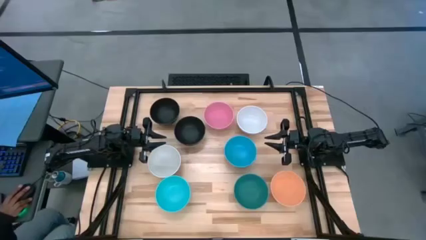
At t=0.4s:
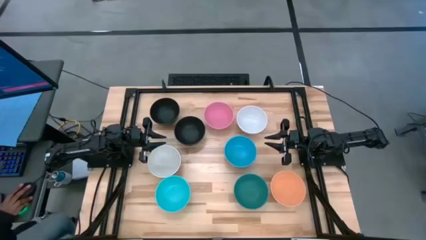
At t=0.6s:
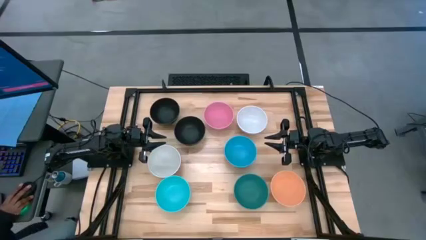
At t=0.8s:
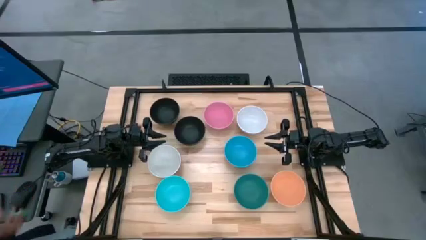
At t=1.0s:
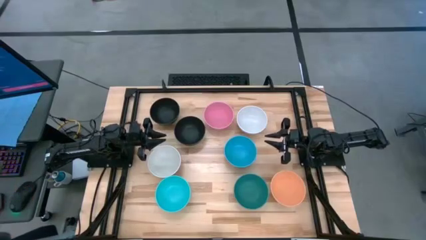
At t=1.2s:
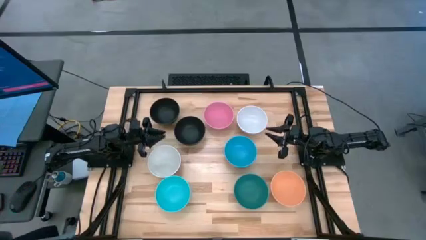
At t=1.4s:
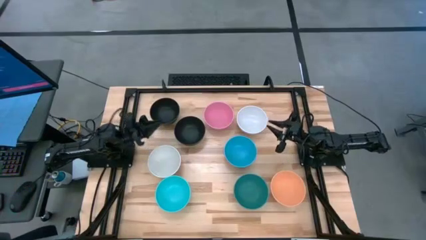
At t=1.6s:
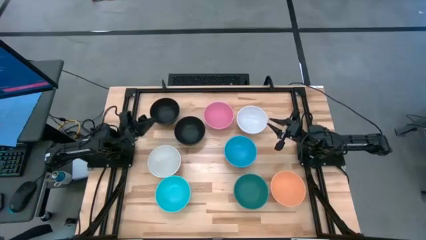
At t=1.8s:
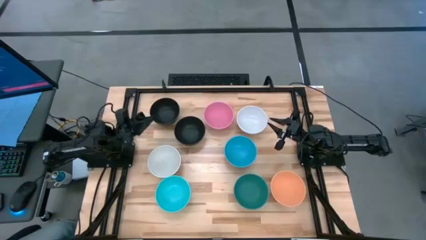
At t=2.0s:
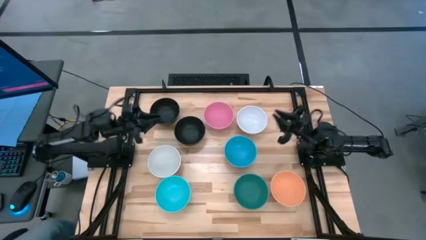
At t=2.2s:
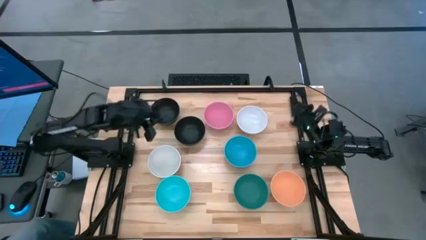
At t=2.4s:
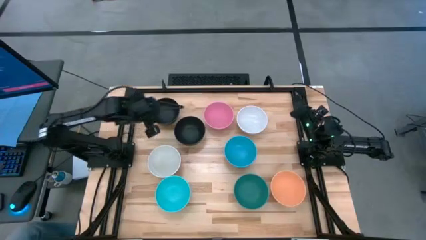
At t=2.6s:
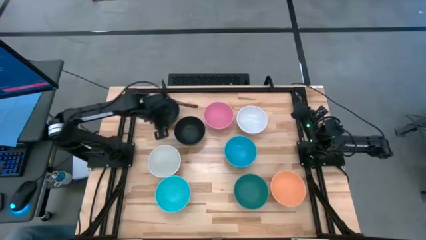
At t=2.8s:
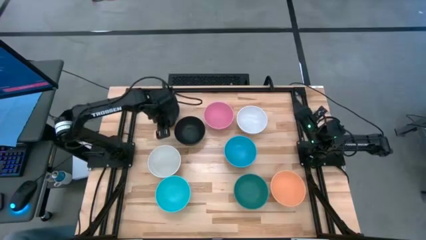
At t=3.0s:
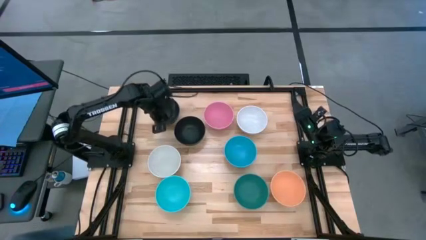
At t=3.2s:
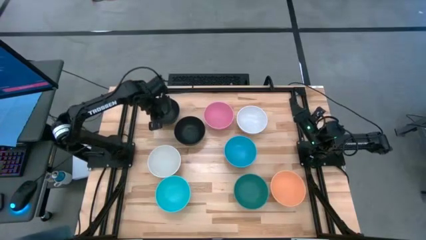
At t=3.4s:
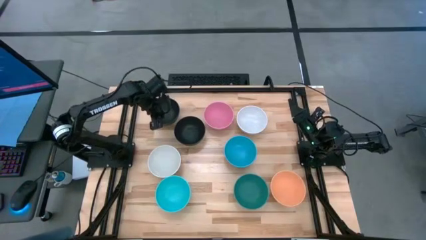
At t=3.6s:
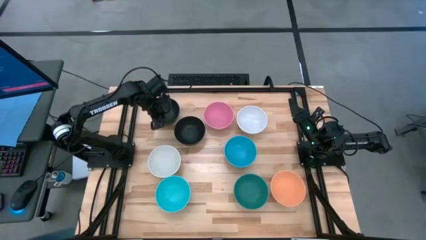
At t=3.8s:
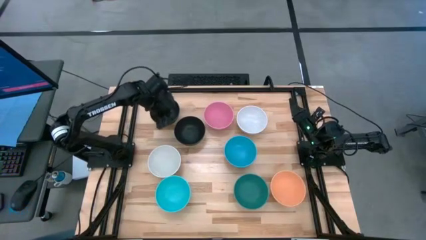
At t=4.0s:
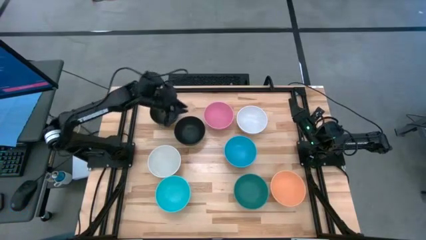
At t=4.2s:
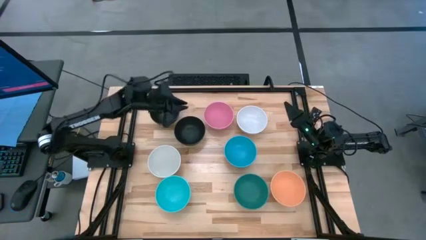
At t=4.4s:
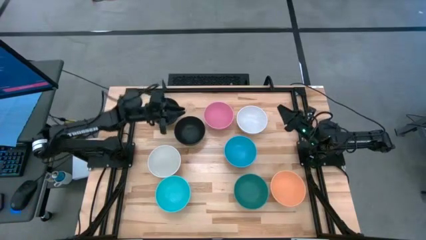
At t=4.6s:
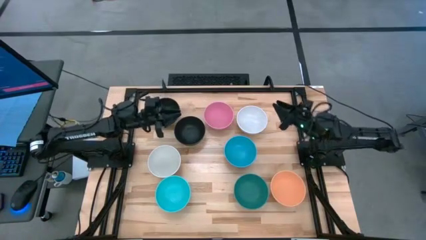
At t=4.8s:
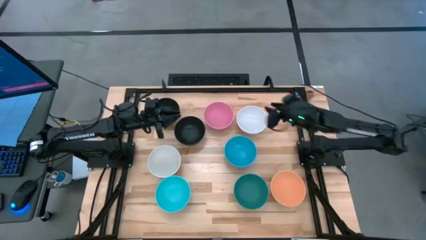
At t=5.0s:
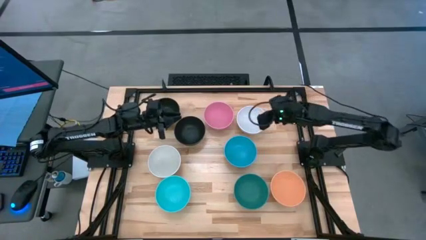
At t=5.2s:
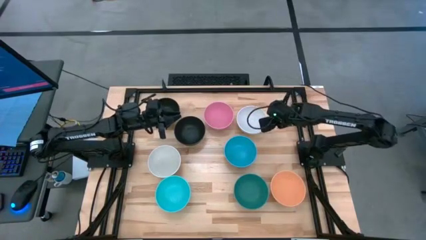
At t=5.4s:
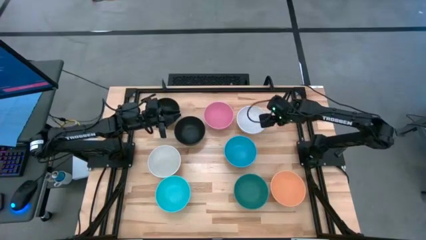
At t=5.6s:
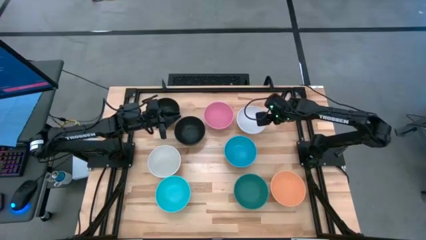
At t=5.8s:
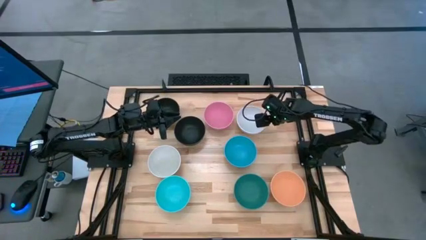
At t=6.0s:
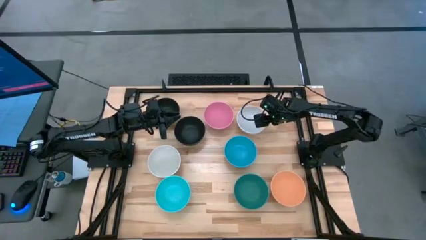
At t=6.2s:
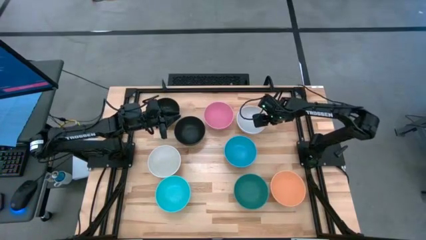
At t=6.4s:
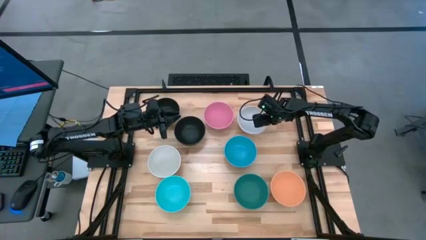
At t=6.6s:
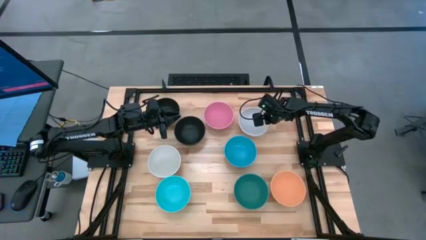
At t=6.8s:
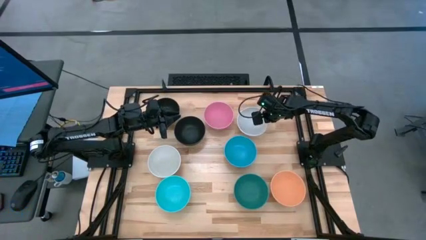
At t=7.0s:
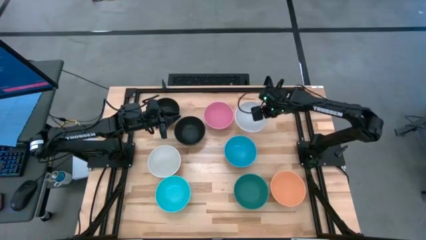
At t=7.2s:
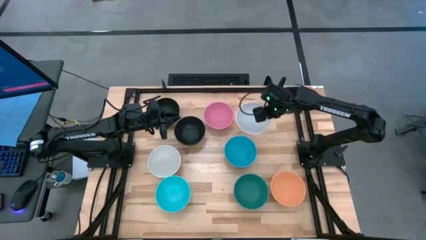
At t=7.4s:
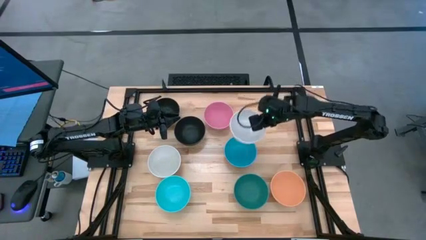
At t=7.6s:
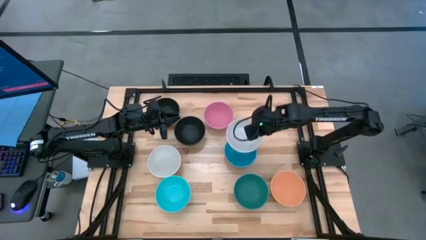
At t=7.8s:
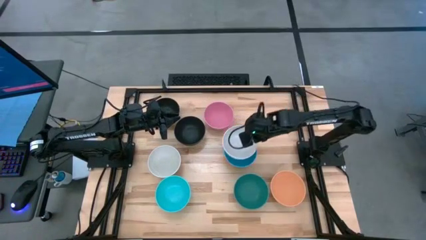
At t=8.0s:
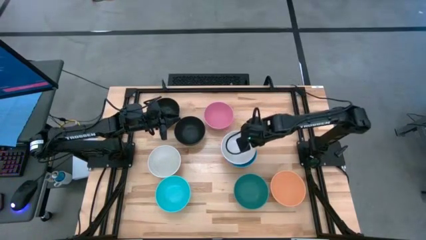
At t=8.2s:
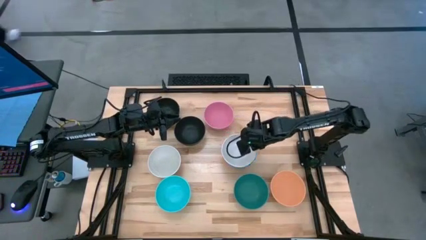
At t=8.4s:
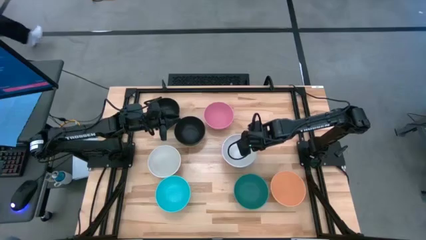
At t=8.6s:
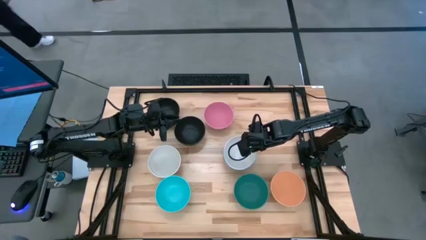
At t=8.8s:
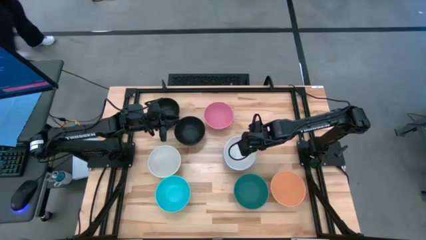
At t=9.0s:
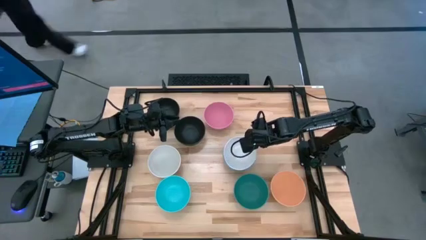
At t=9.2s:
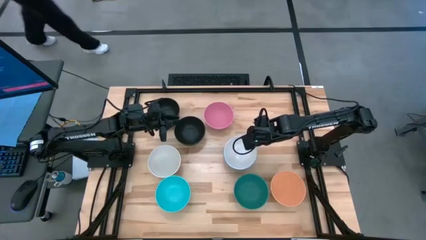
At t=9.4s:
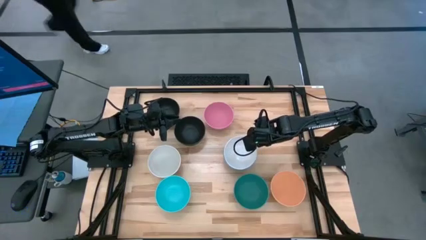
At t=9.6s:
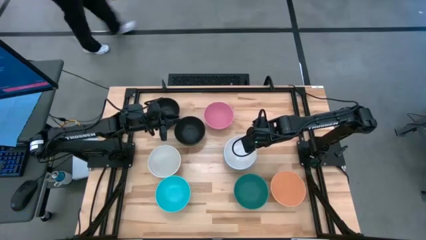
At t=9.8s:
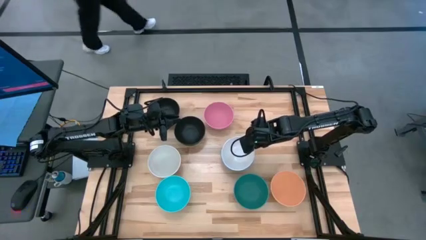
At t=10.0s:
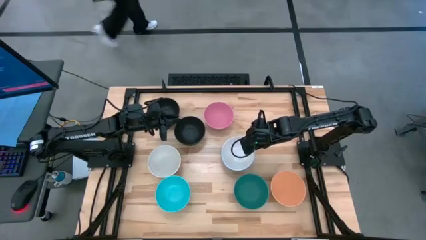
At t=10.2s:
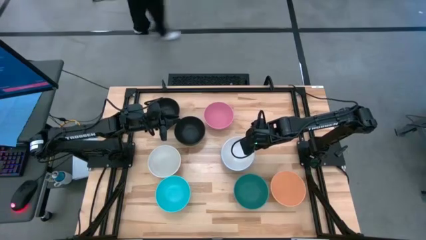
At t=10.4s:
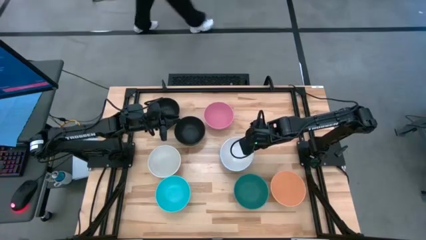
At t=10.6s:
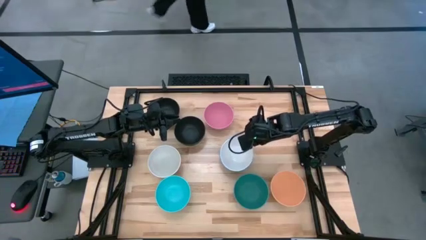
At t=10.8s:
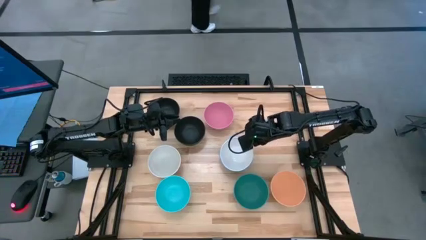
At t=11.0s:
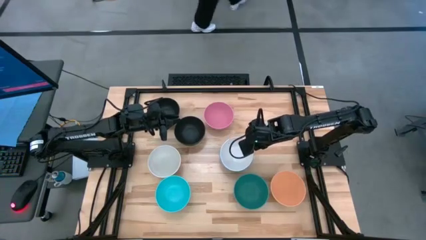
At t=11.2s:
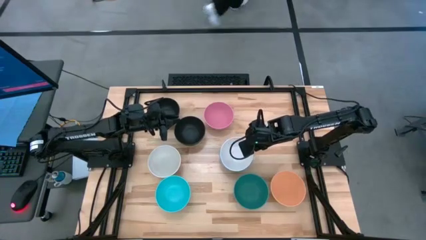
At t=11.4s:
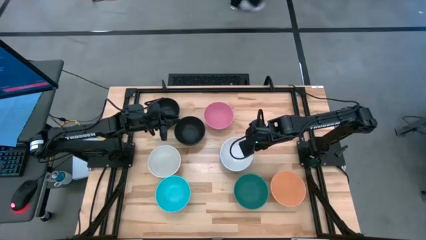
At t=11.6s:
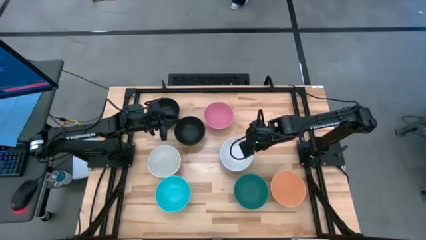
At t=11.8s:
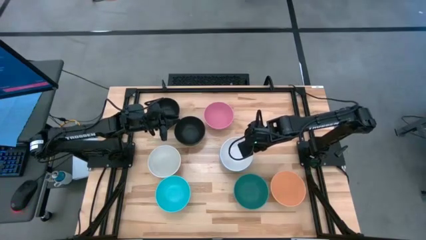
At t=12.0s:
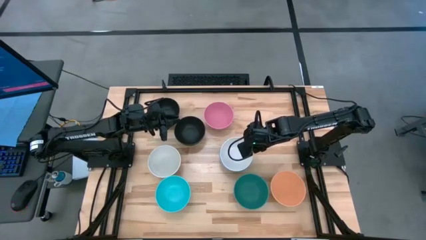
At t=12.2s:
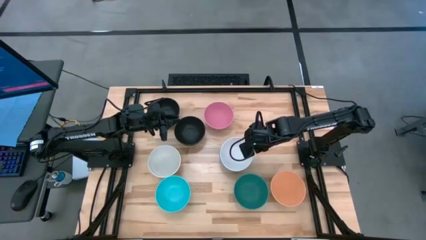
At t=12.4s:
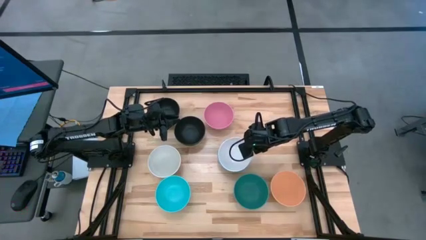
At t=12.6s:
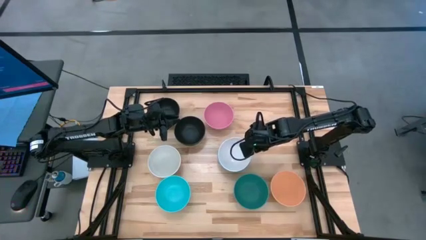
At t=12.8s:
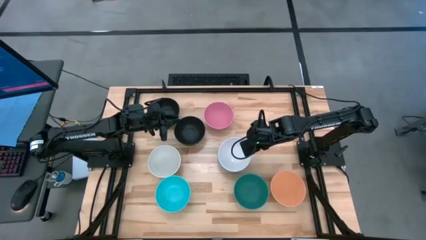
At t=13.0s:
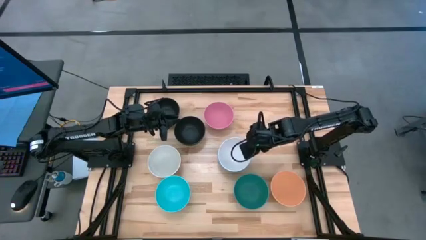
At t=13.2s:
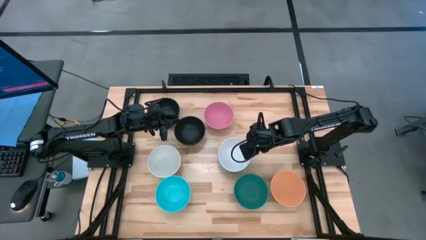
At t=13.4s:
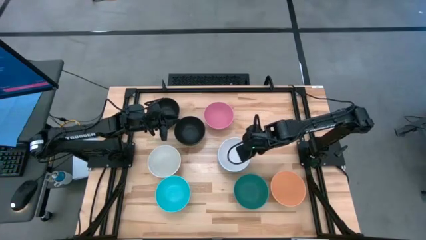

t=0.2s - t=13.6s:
Task: Nest bowls inside each other
Stack the right white bowl on top of the right blue bowl

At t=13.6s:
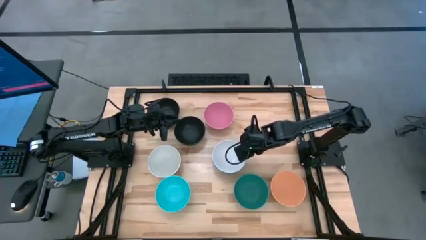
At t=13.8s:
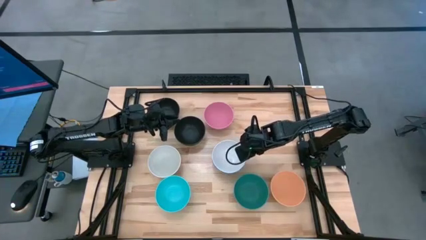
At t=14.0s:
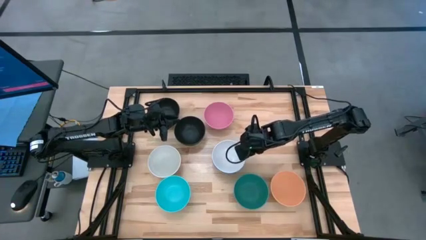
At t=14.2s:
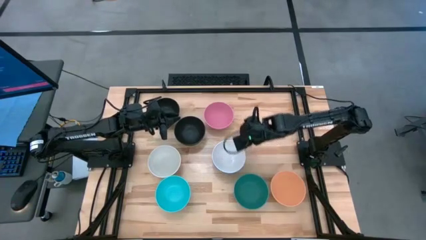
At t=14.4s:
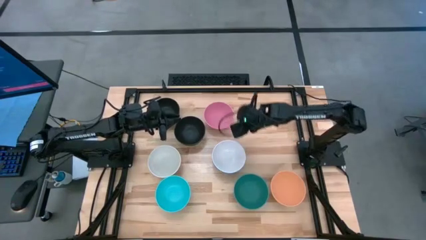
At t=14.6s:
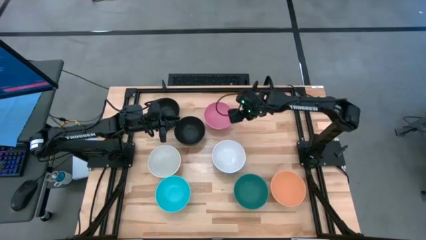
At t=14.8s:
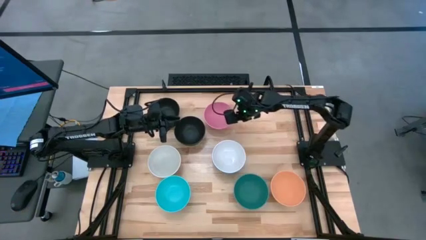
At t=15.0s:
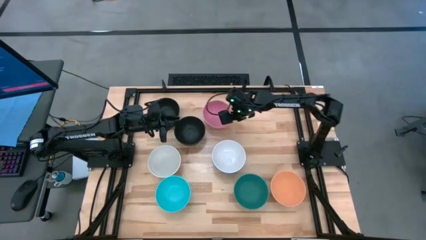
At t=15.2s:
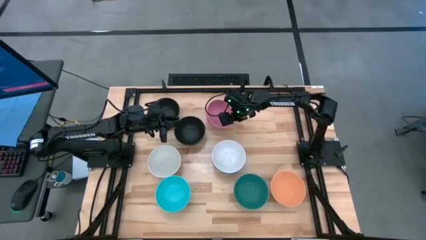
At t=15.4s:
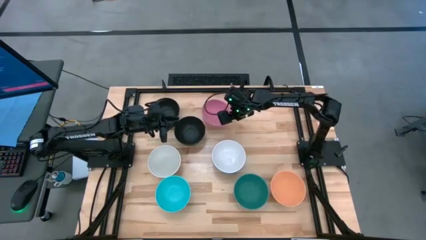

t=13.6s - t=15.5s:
Stack the pink bowl on top of the white bowl

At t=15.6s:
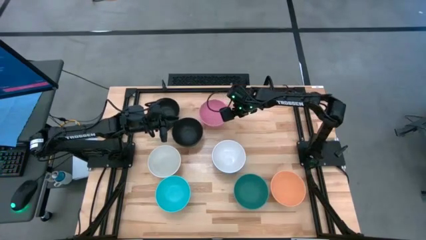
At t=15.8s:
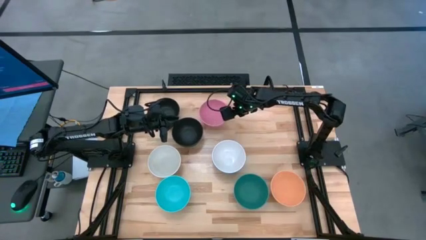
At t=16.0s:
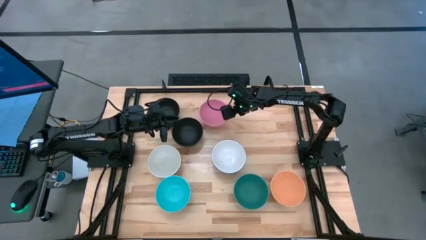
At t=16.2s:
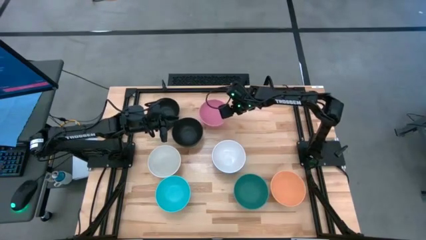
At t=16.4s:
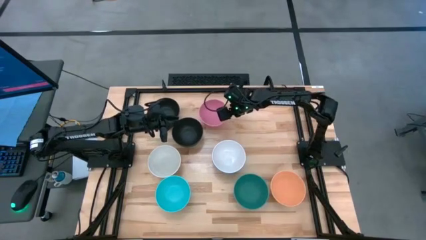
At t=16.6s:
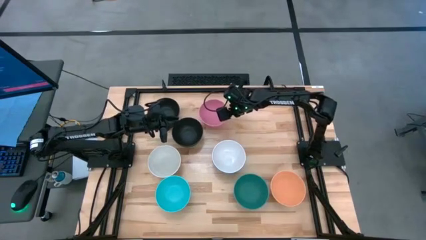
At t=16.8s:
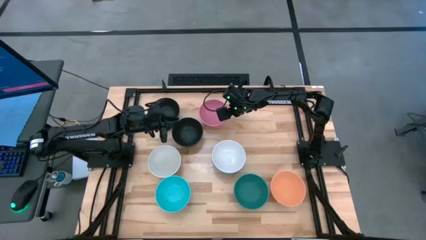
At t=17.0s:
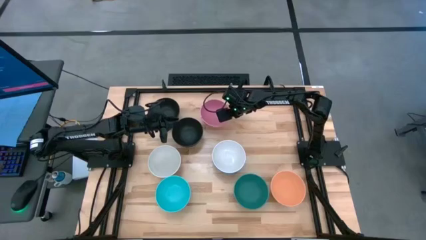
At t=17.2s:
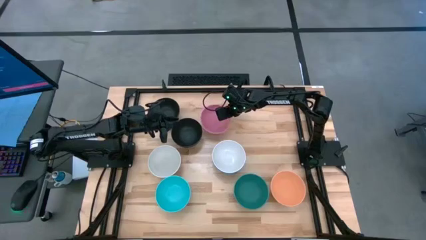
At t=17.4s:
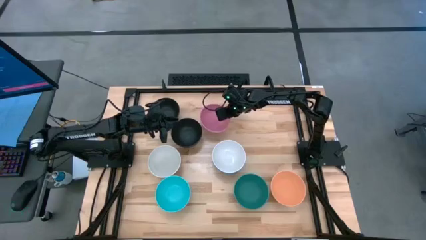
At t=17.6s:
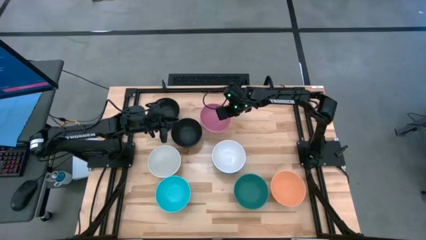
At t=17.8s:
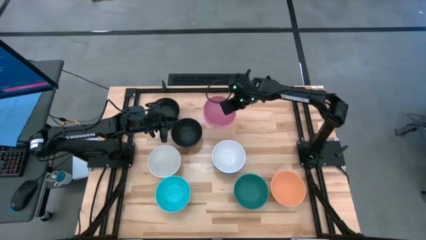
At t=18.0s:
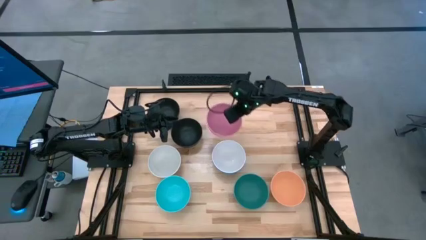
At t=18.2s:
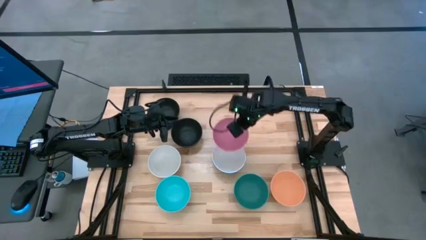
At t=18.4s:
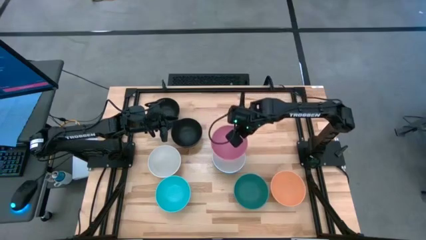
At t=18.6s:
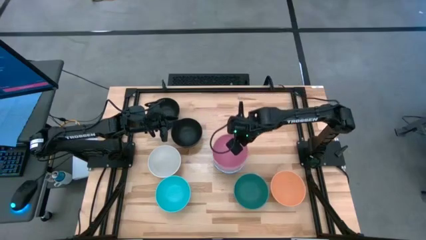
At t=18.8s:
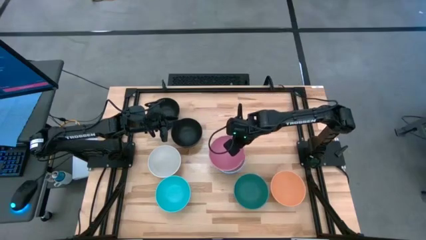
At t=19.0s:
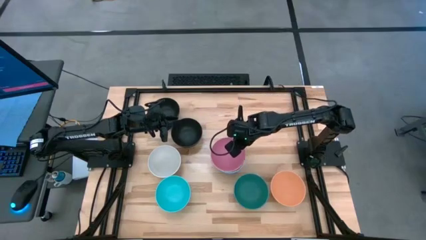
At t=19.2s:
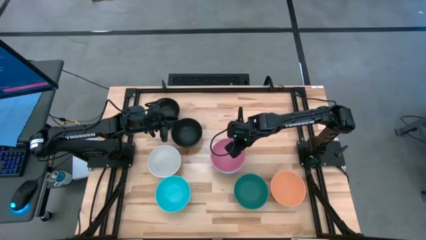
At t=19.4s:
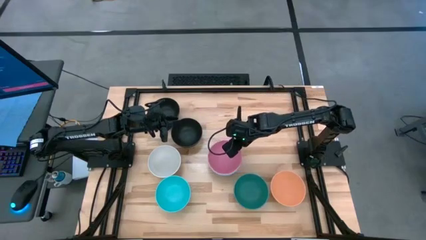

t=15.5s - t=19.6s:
Stack the pink bowl on top of the right white bowl
